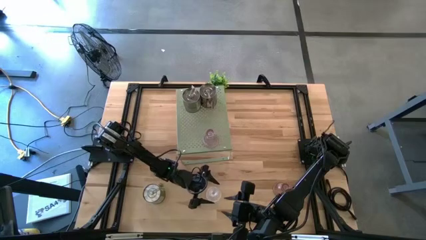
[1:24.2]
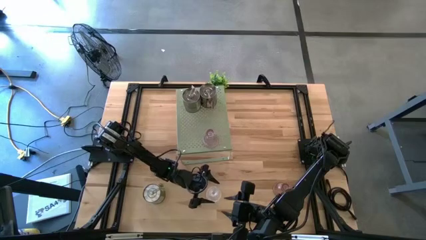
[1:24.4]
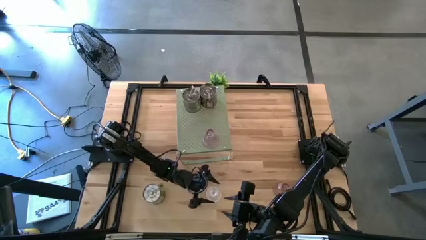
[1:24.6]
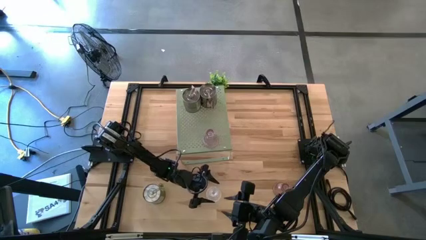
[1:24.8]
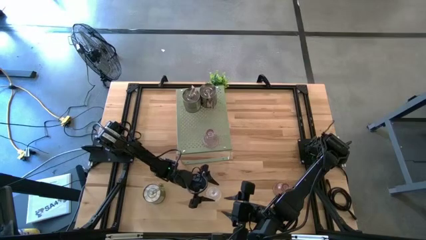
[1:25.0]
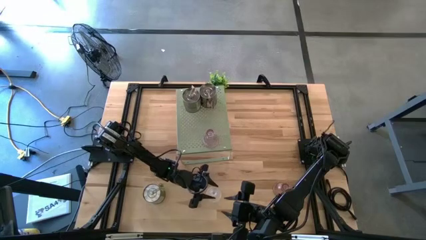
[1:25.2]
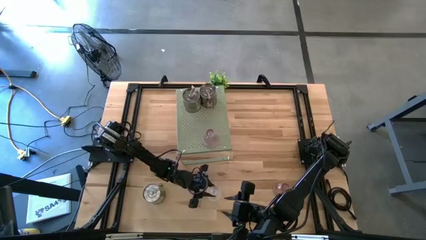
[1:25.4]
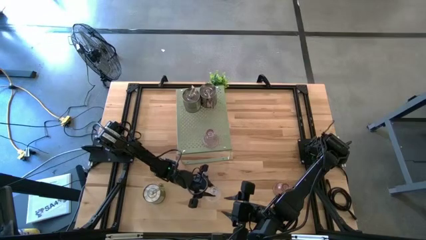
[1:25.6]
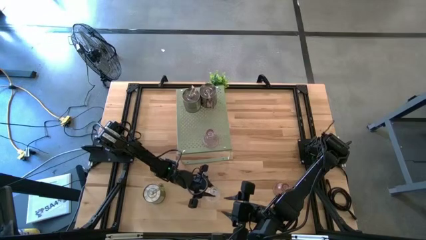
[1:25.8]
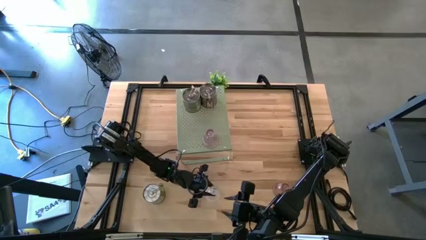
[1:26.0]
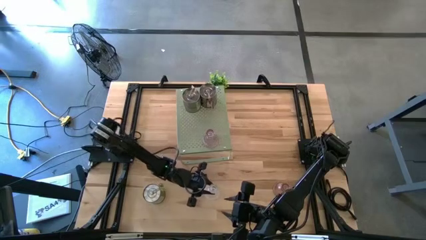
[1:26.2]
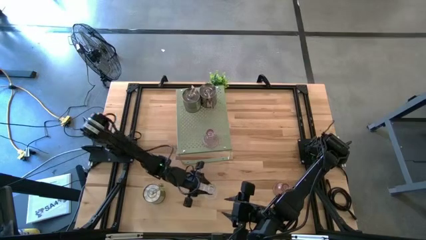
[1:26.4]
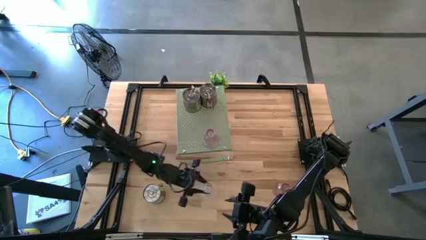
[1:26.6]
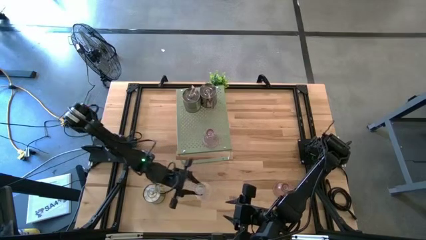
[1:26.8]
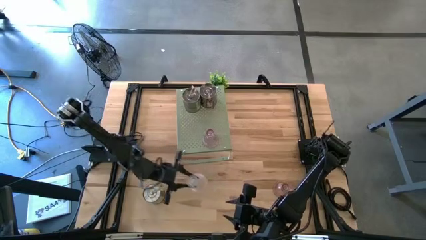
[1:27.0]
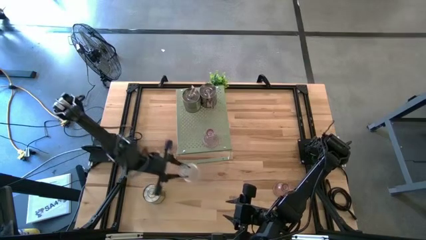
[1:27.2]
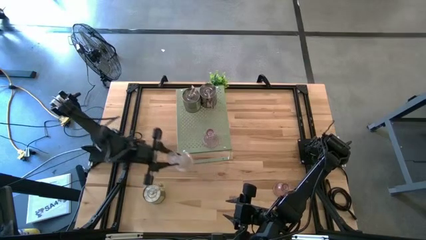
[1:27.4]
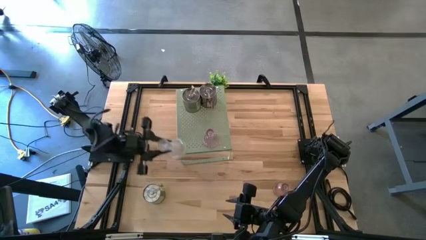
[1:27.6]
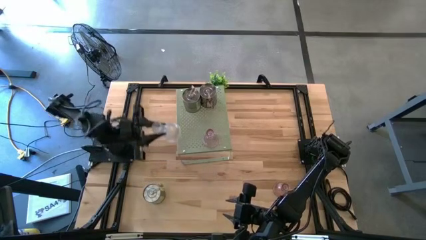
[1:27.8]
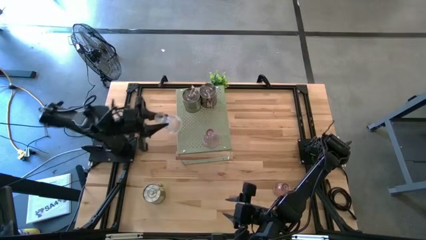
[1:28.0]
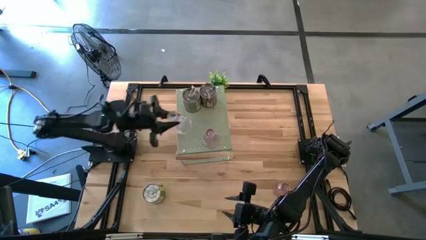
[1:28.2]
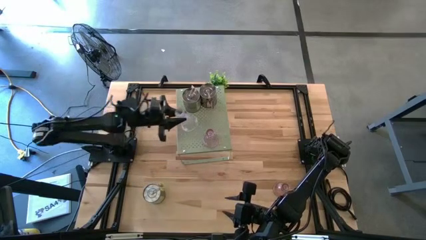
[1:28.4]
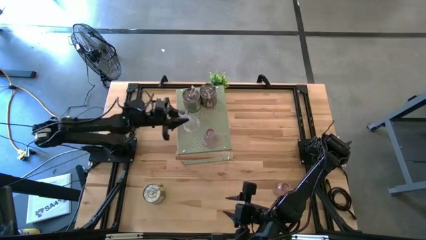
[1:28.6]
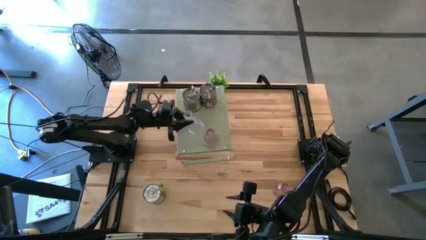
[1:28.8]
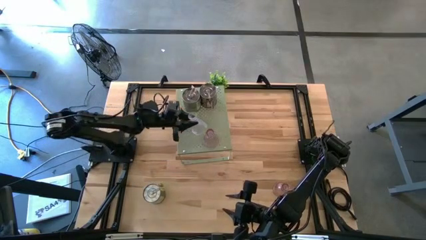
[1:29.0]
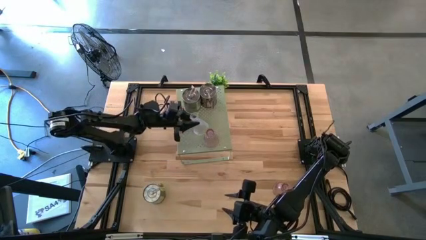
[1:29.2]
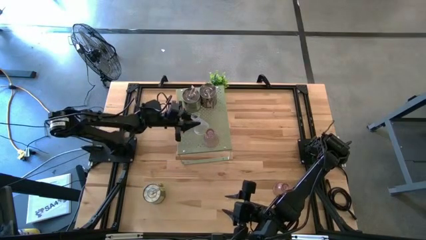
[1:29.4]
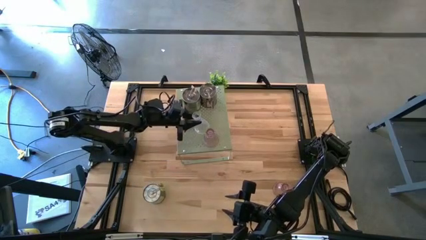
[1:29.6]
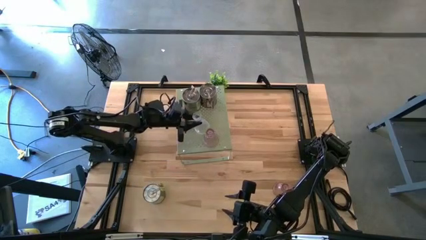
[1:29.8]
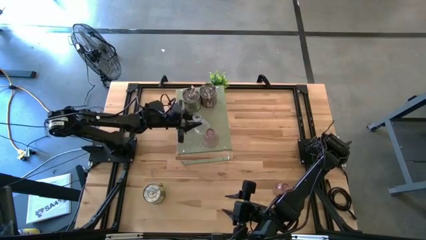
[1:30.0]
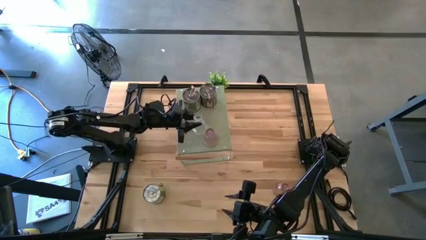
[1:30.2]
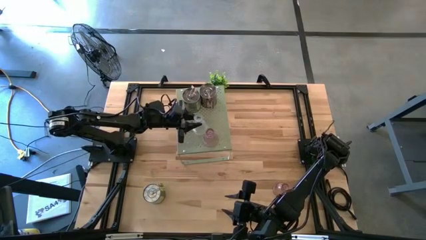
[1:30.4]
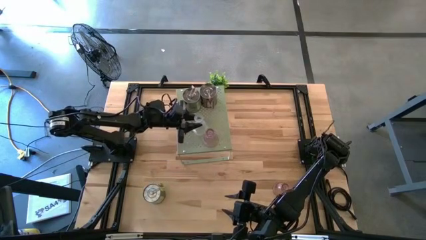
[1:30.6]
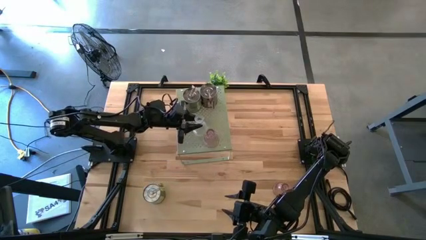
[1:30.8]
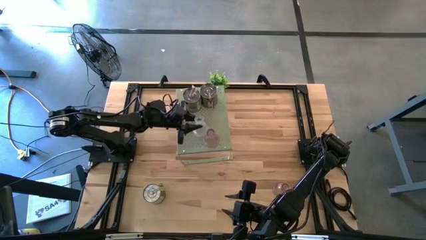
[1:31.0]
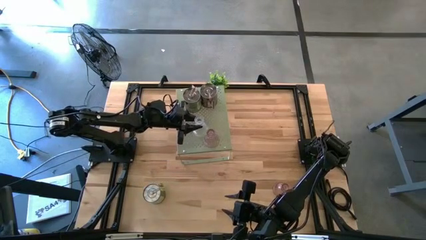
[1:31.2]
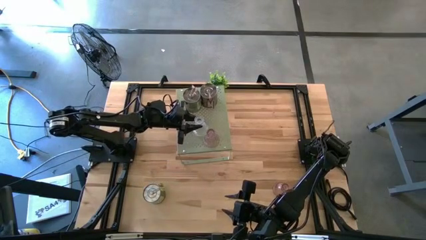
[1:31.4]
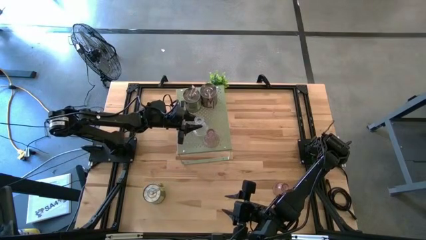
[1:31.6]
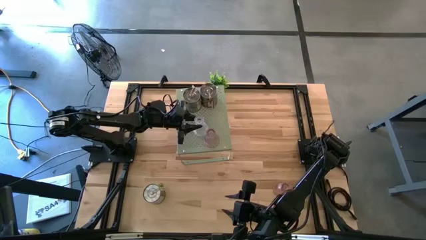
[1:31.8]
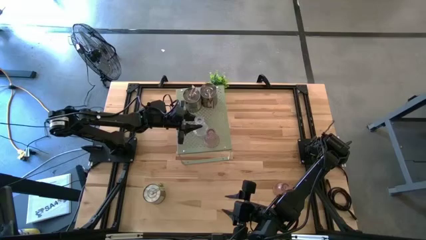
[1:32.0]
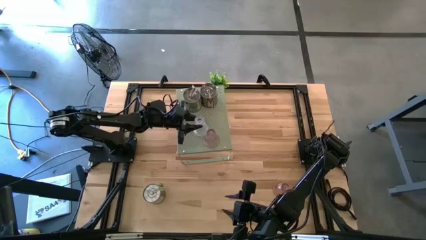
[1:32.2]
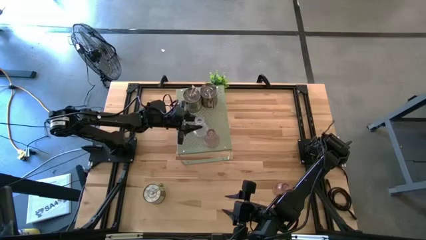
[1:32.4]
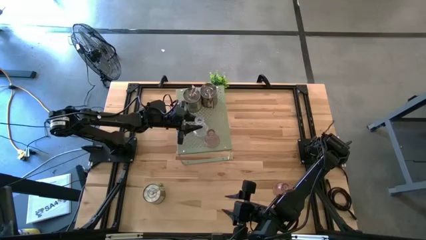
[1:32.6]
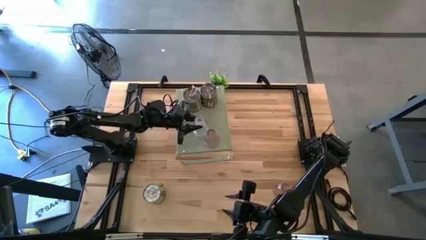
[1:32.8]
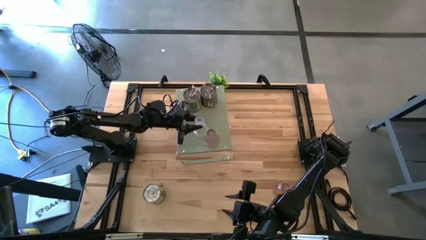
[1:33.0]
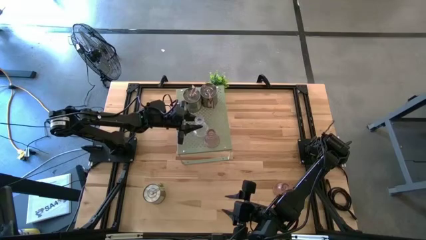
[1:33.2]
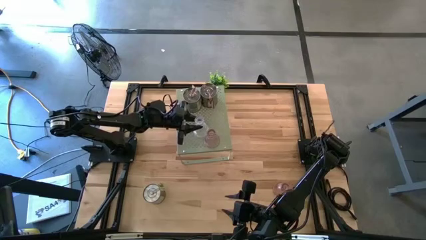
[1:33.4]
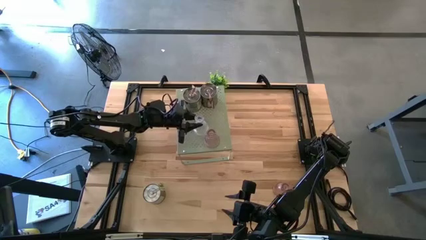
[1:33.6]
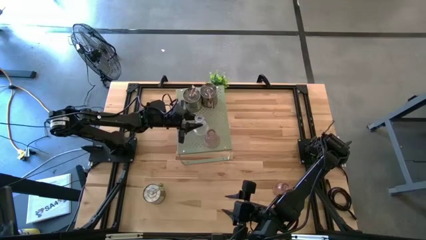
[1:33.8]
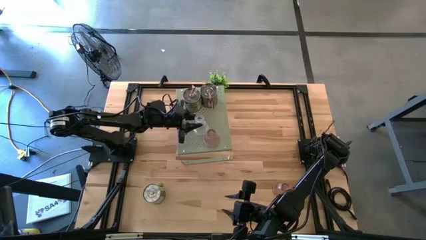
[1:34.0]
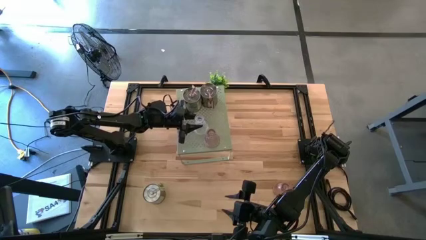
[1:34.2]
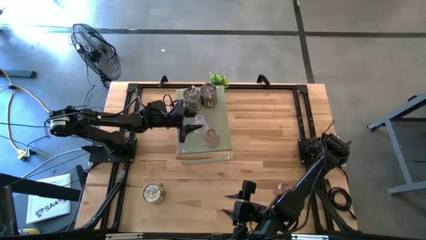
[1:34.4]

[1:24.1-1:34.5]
Task: Pick & Place candle stick holders
Put the transparent candle holder on the shelf

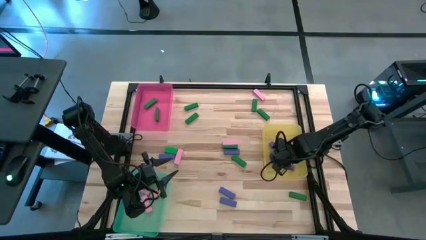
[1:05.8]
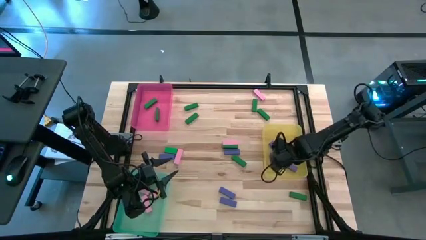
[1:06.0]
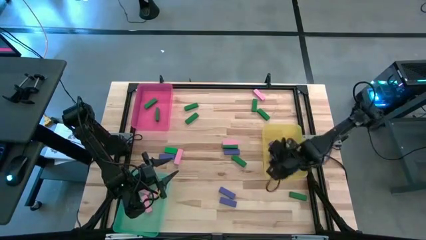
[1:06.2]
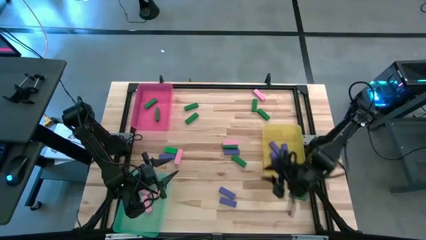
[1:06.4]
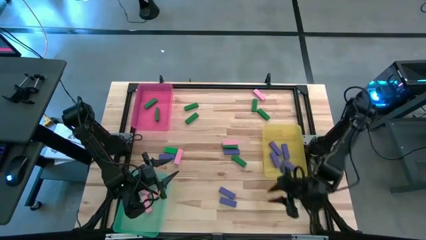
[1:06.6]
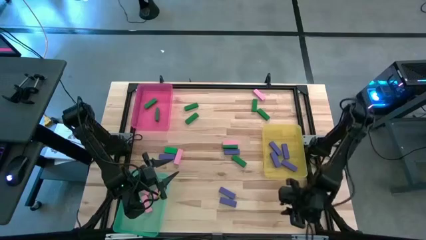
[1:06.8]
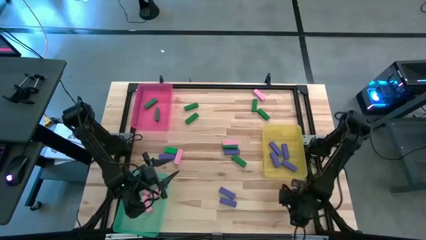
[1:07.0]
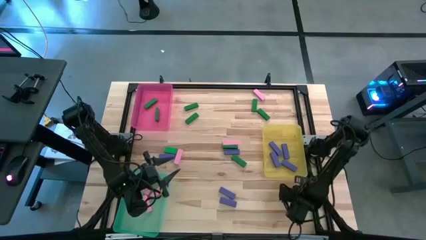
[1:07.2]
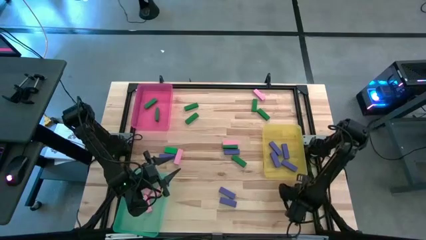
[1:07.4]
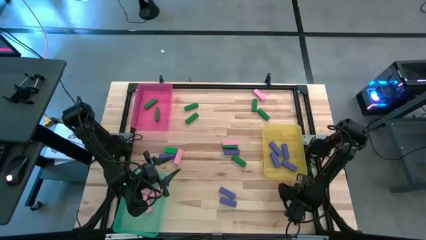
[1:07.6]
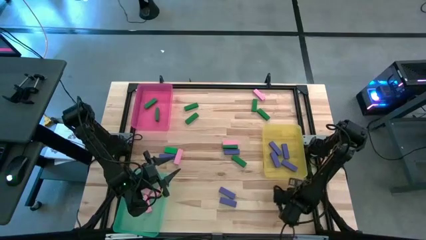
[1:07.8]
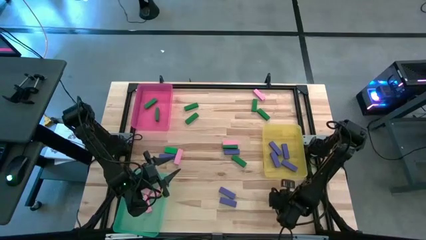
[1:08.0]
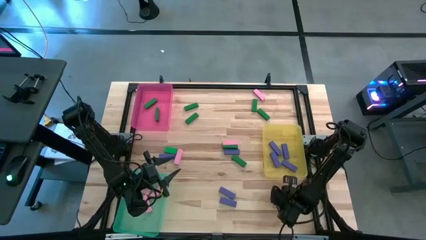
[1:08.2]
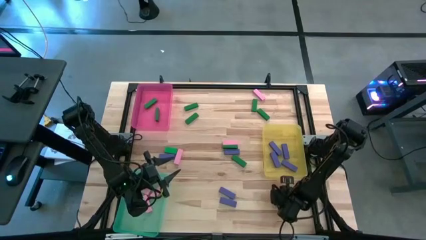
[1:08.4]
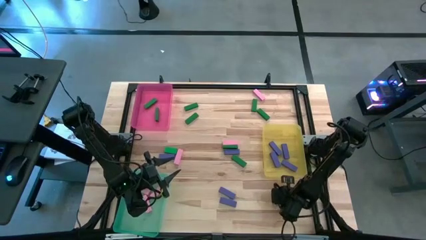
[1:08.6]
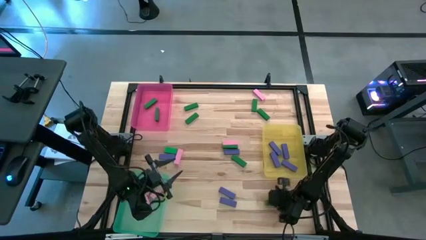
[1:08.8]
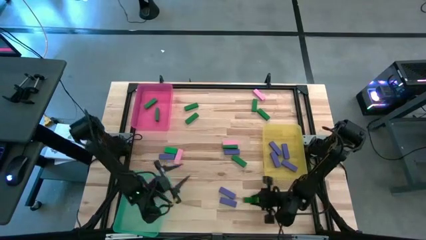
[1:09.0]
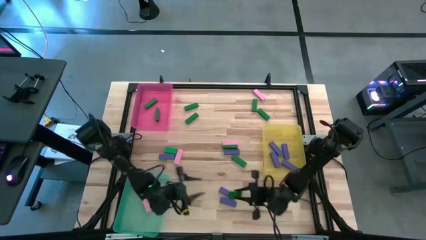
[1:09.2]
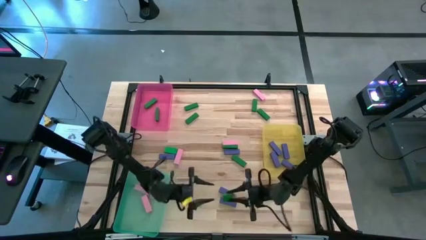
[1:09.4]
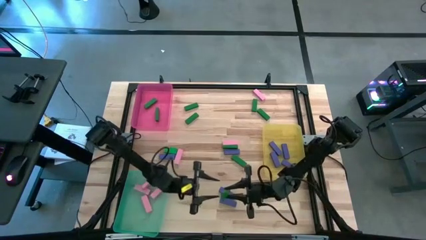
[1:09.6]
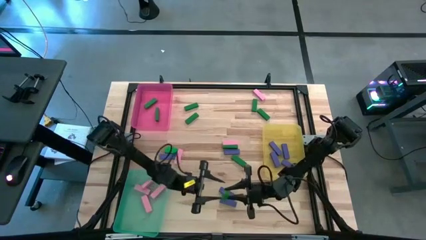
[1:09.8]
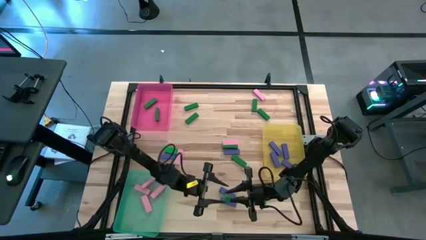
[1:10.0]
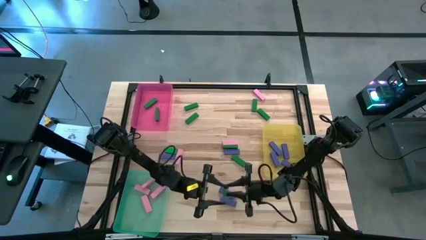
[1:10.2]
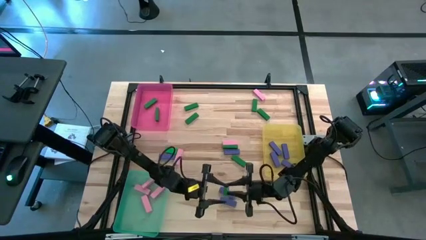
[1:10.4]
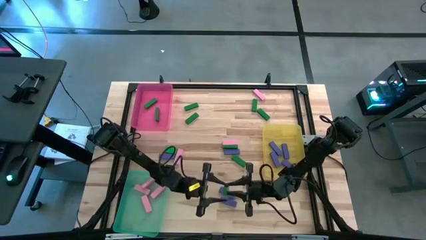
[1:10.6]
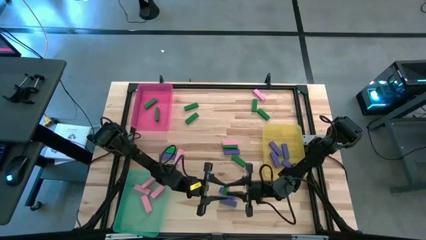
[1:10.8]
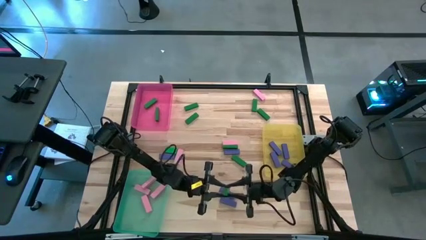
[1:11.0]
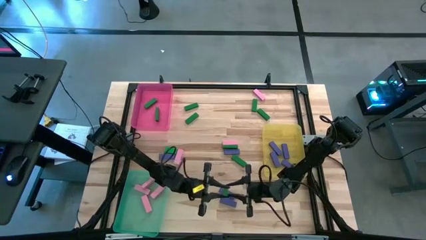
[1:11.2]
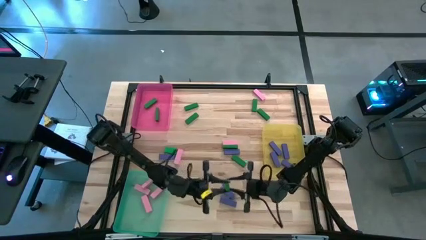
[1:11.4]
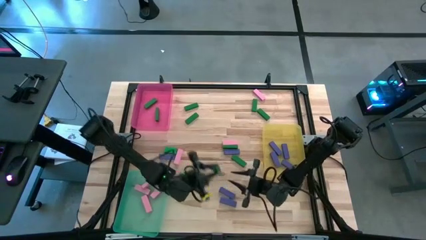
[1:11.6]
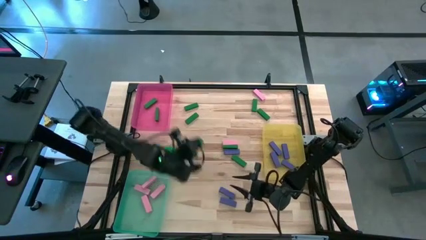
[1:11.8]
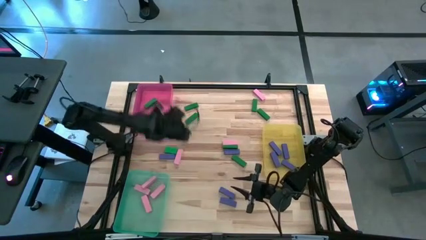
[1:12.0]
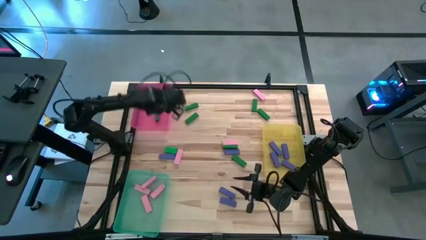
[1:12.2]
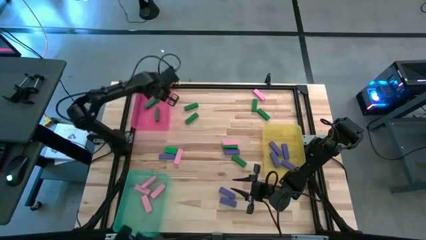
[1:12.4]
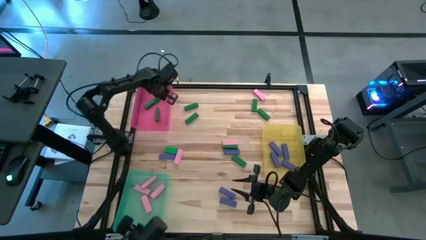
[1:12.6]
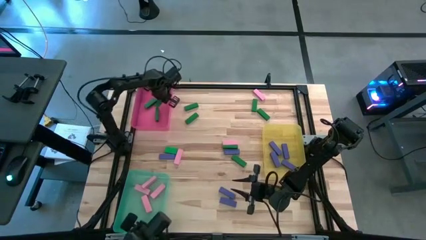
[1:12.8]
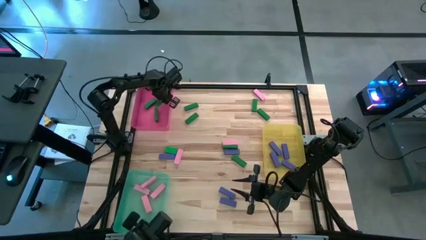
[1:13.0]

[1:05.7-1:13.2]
Task: Sort blocks
Put the green block into the pink bin
